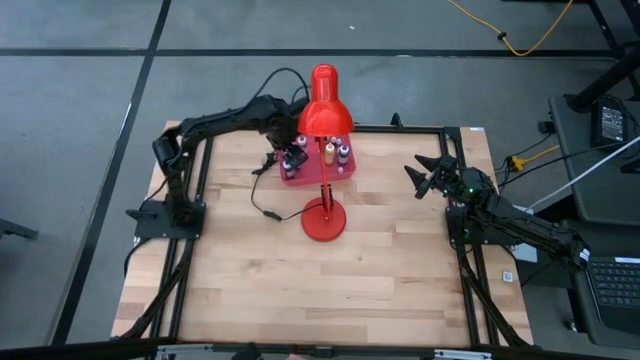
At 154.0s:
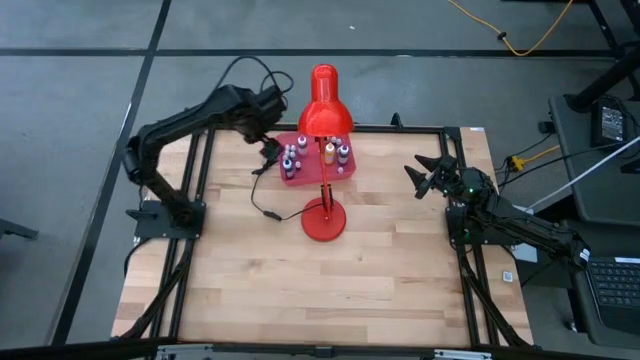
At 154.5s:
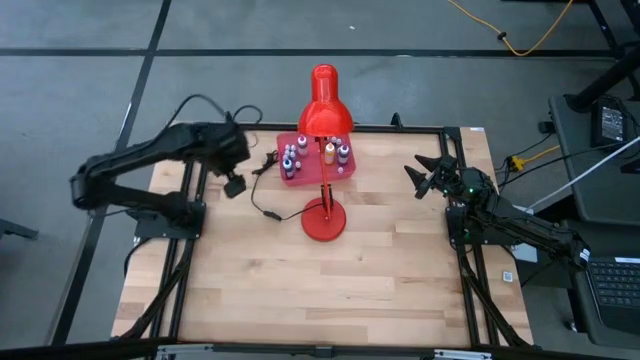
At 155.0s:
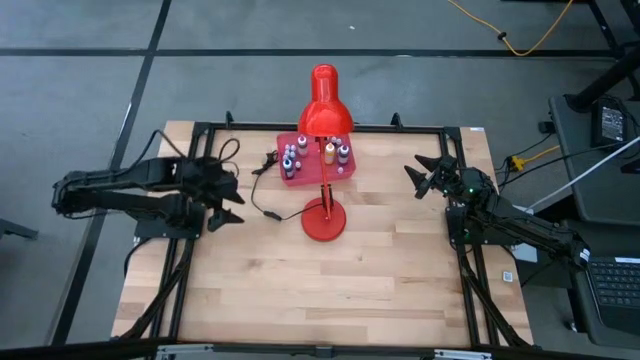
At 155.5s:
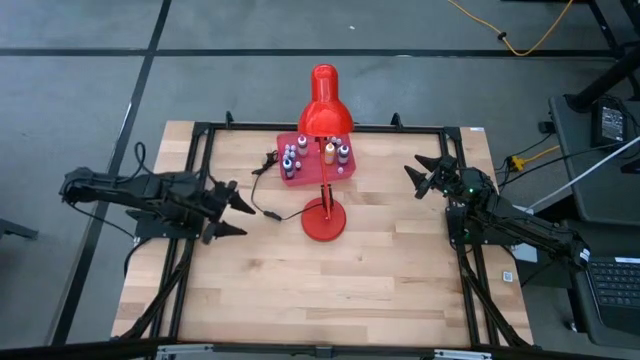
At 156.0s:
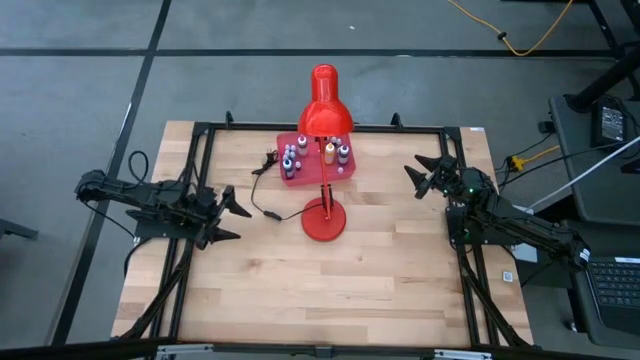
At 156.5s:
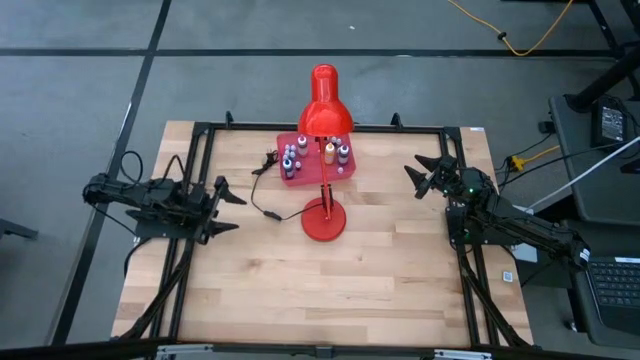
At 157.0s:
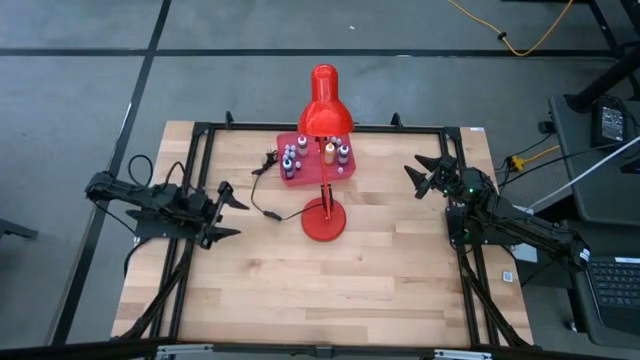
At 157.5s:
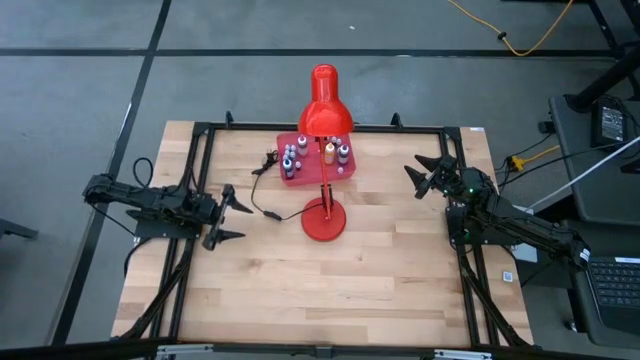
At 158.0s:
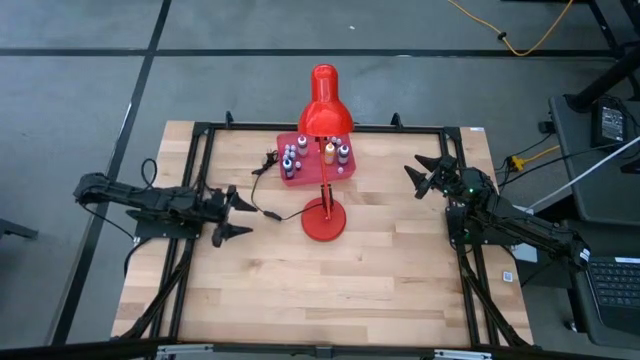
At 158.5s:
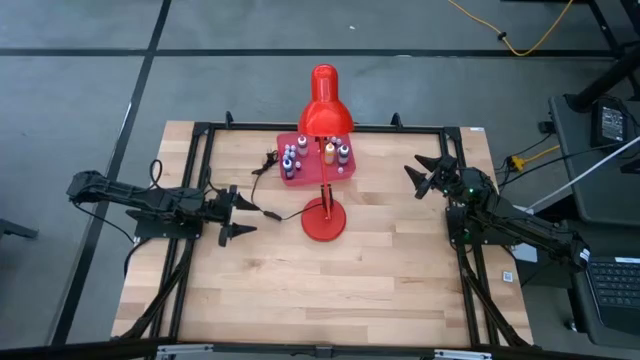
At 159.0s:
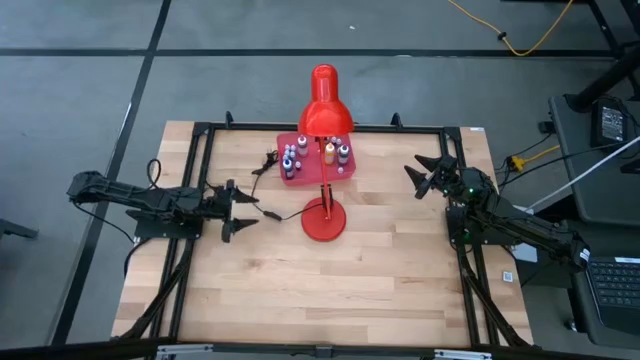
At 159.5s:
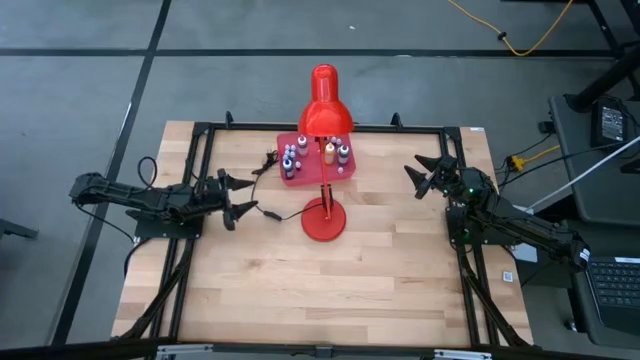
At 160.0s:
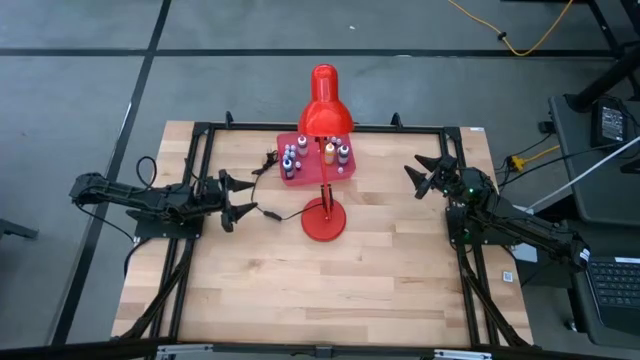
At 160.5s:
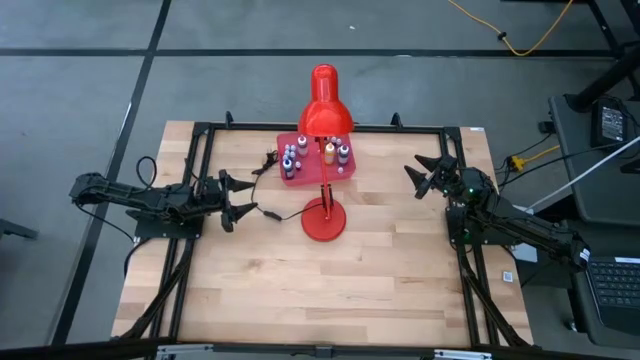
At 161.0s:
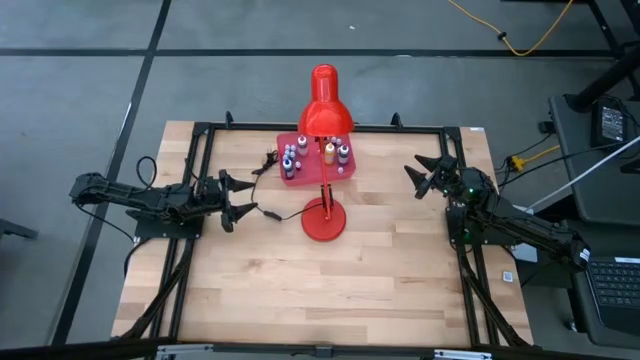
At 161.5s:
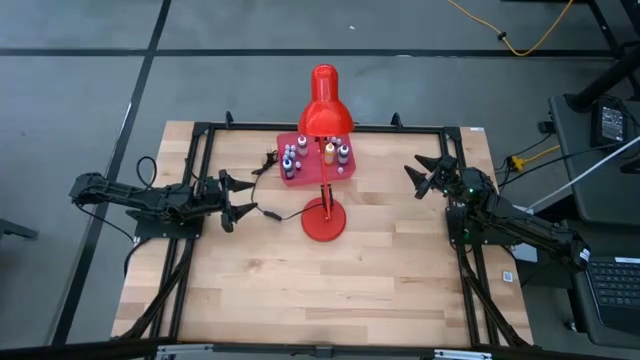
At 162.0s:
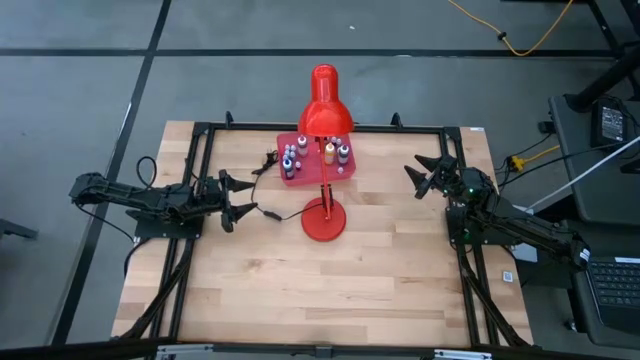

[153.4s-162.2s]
Task: Pick & Place food coloring
Return to Home Position

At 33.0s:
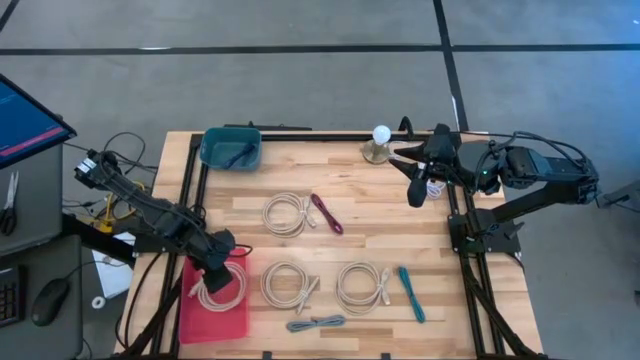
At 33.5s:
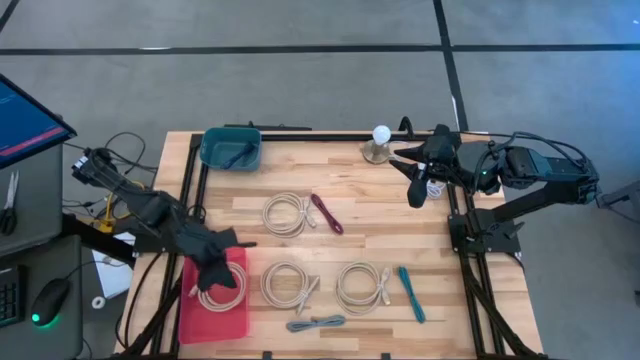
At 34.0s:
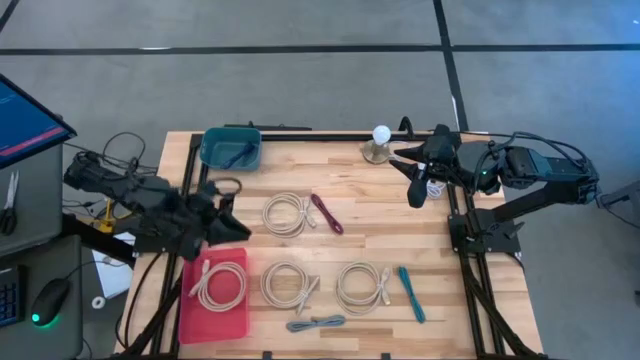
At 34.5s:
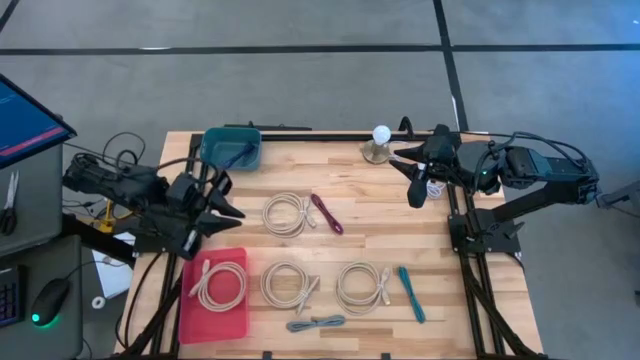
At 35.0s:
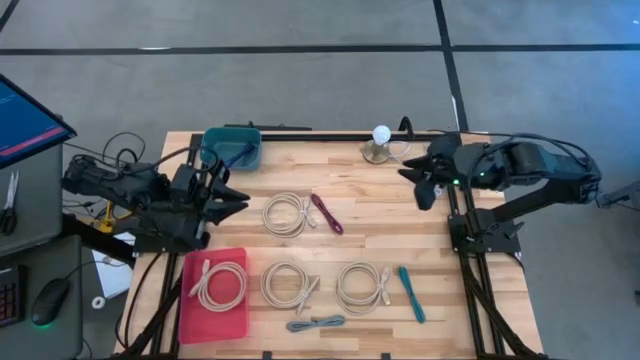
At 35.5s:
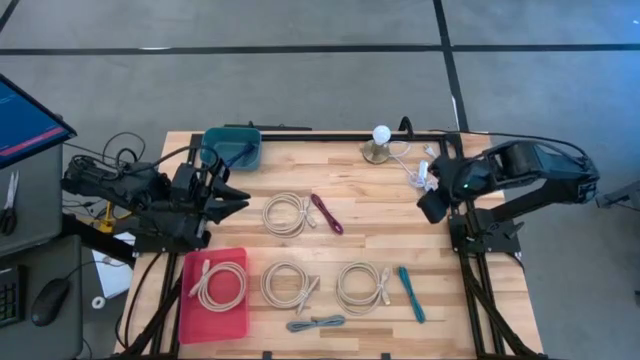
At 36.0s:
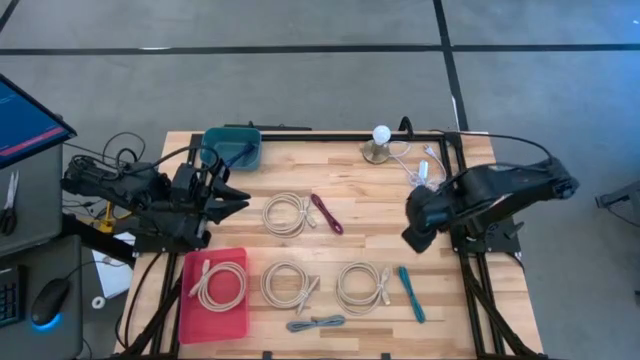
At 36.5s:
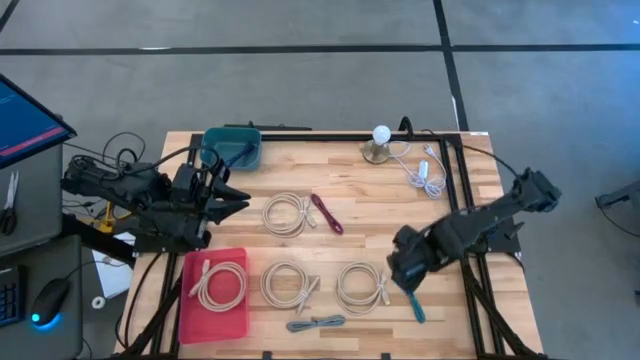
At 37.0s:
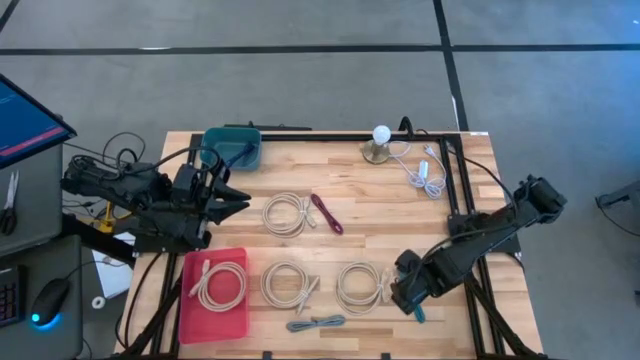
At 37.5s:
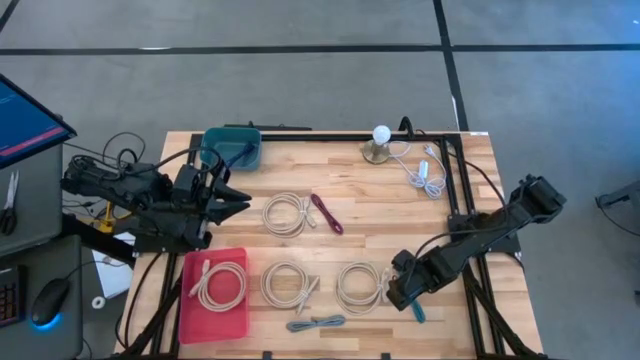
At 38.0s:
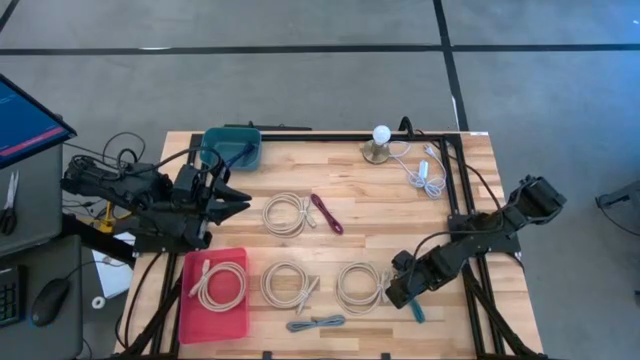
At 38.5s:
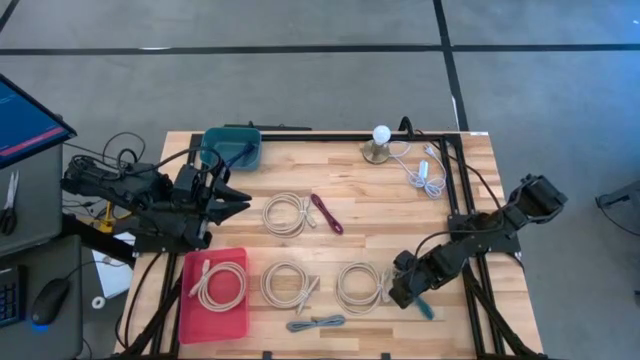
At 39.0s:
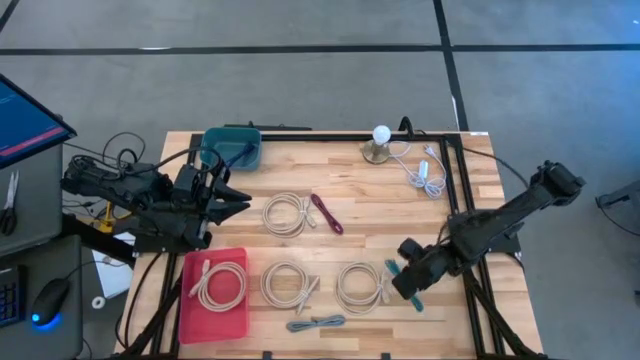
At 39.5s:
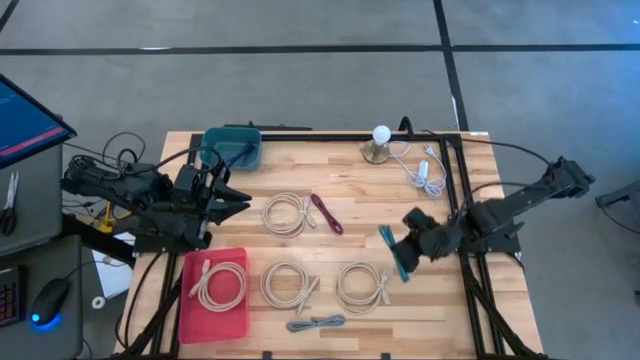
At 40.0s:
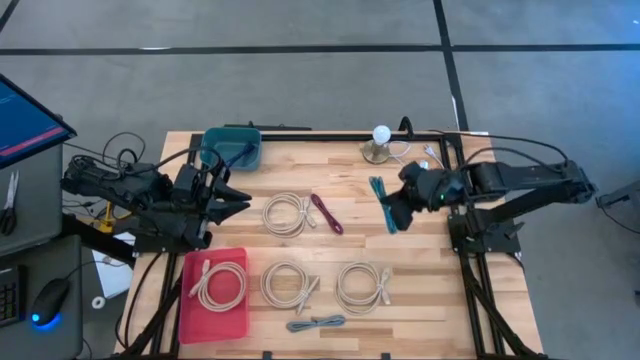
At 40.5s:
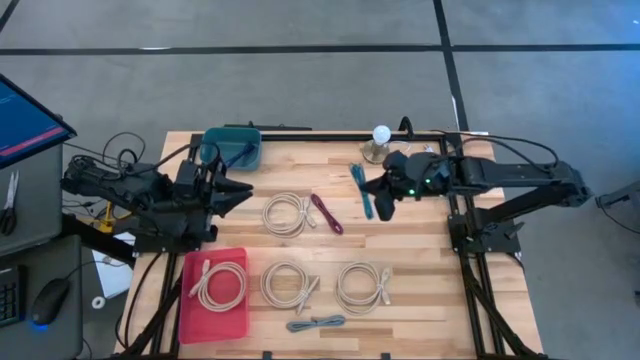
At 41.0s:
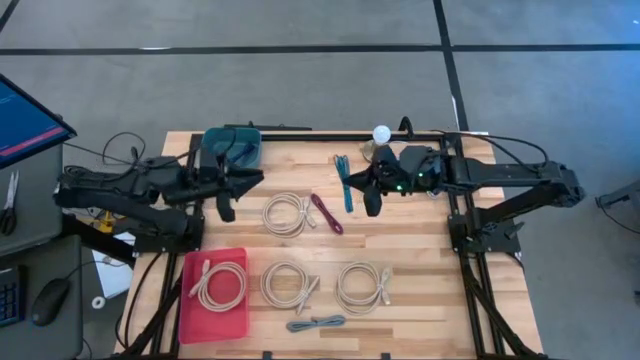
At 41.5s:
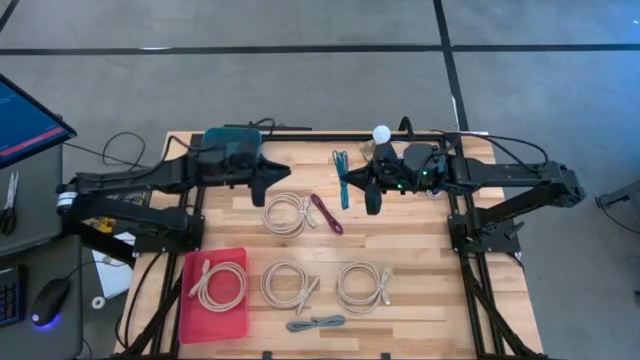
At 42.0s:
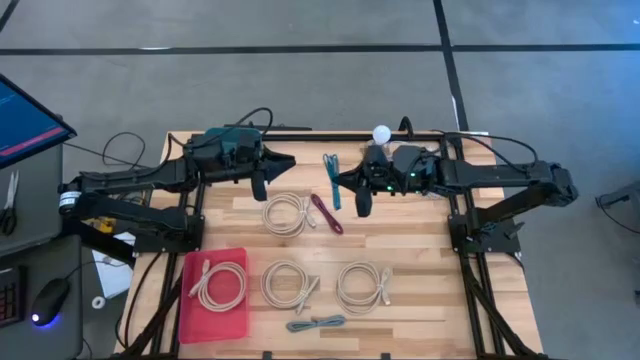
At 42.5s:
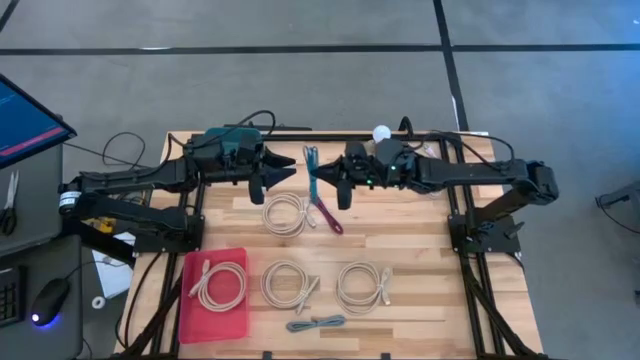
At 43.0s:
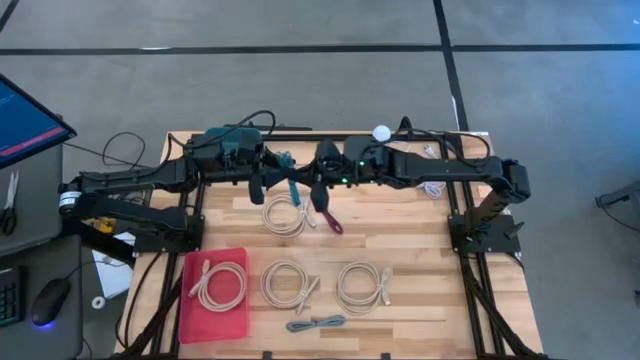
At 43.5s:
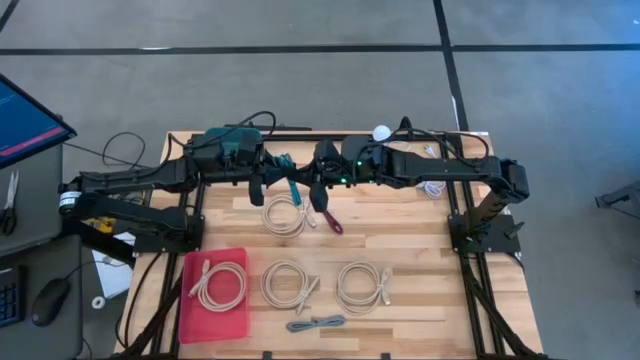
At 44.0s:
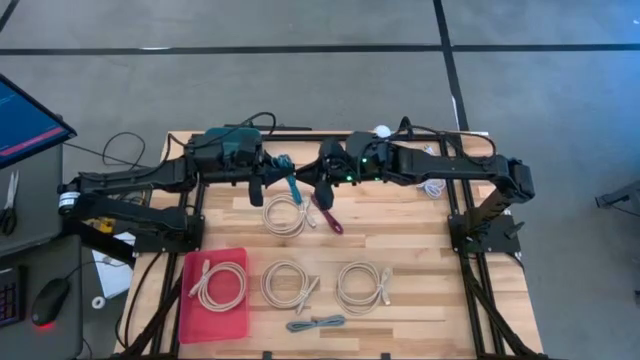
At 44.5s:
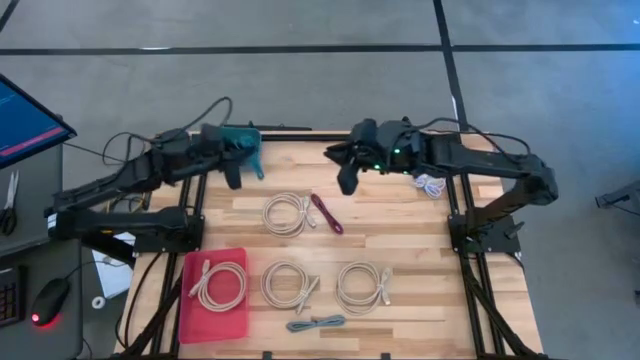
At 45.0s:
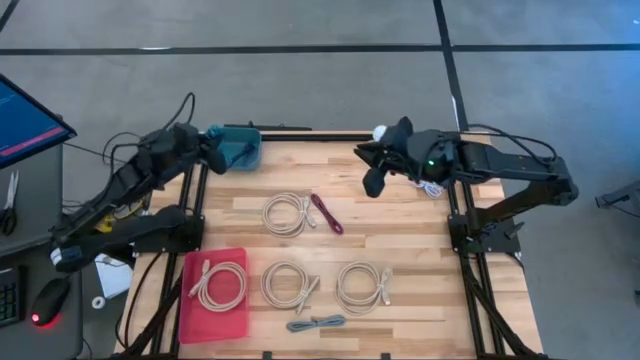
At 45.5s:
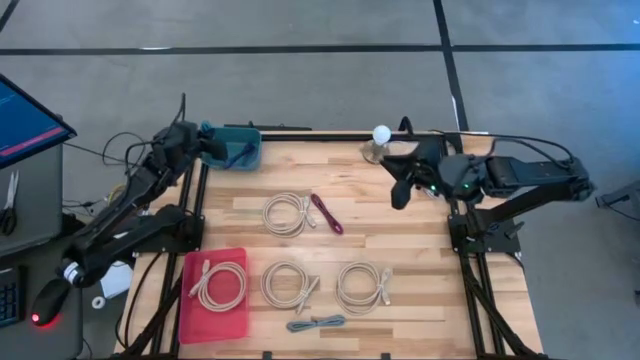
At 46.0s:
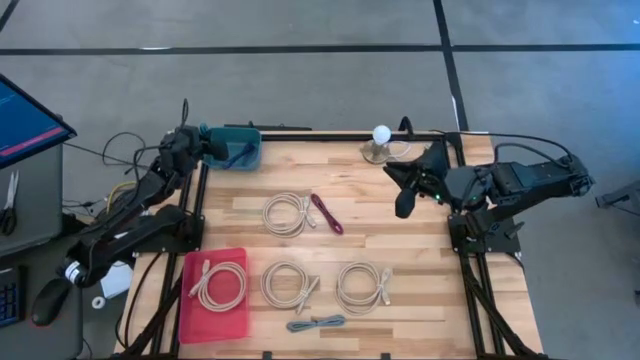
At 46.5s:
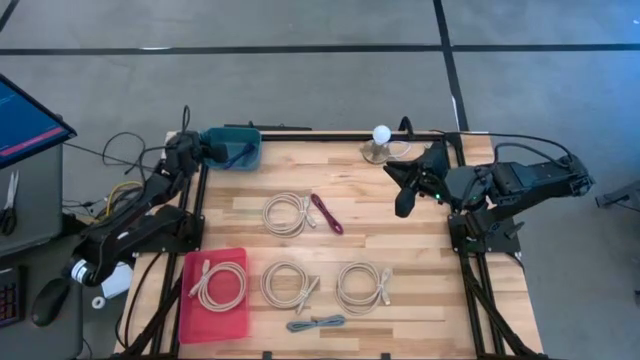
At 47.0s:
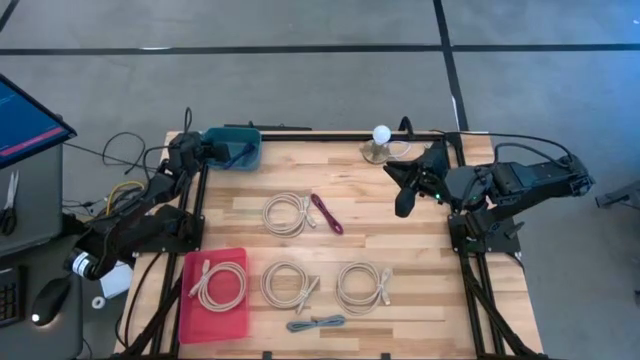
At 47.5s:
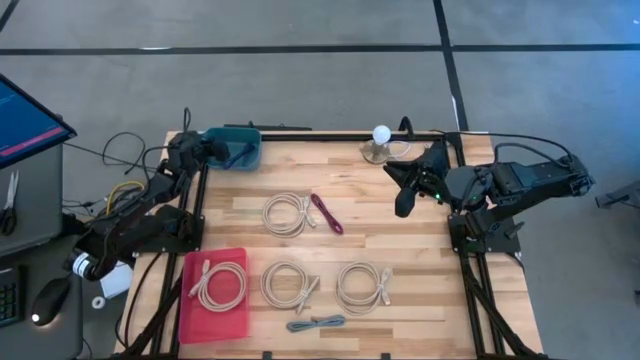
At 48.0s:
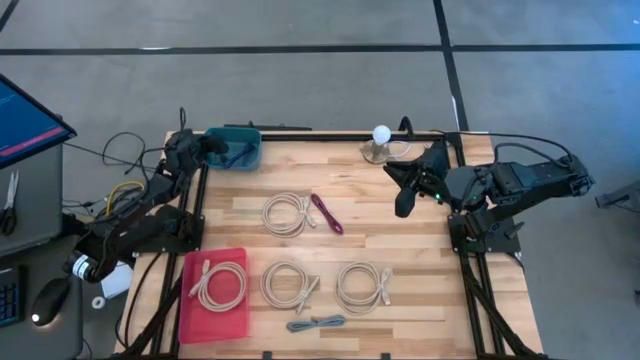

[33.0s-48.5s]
Task: Pick & Place USB Port
Put the blue USB cable into the blue bin
